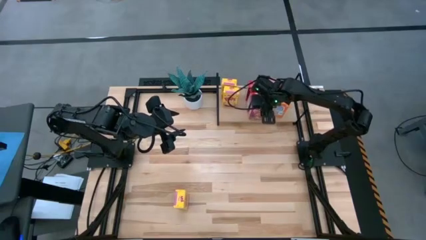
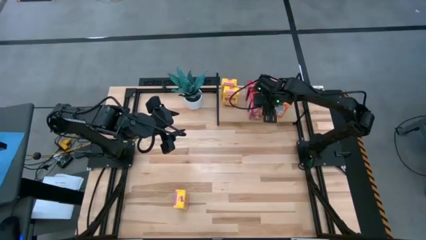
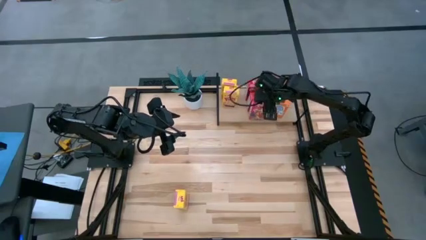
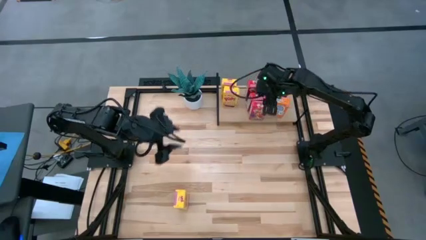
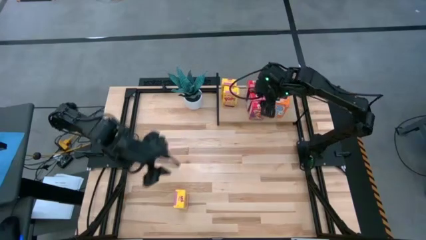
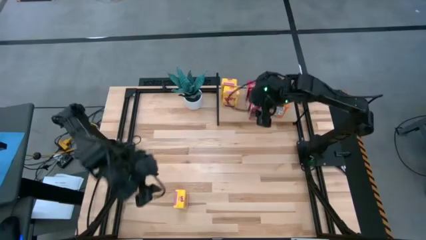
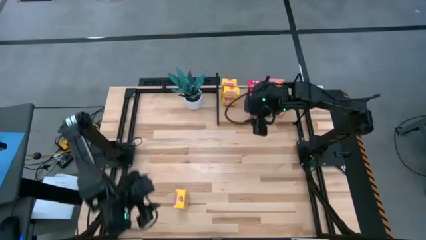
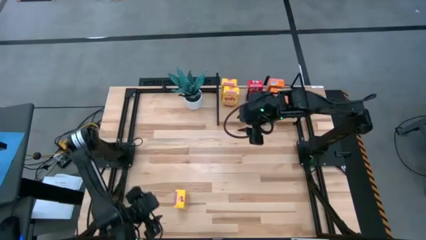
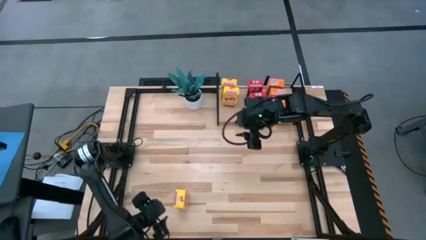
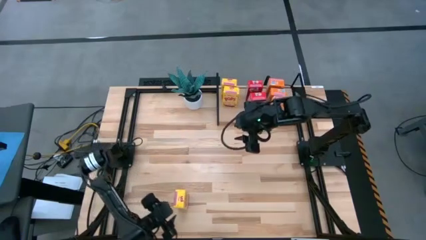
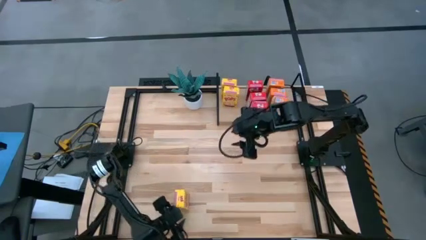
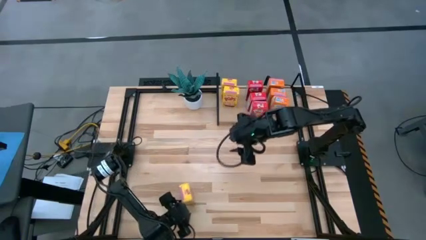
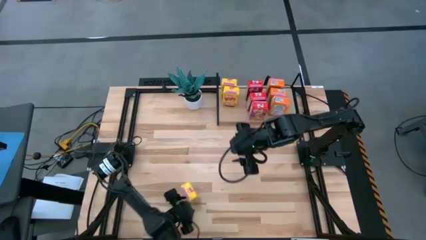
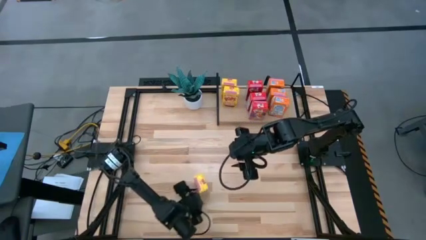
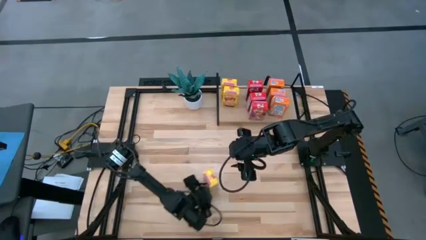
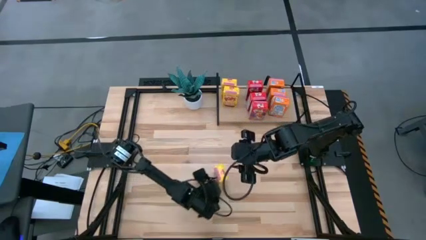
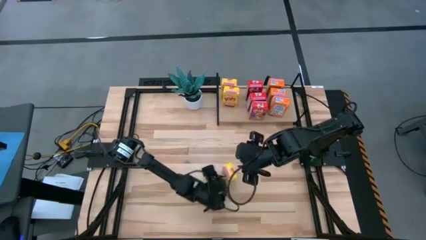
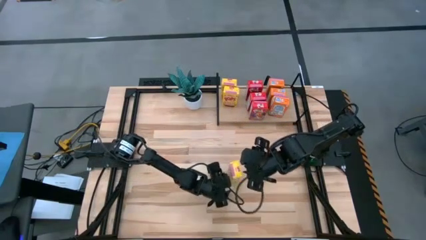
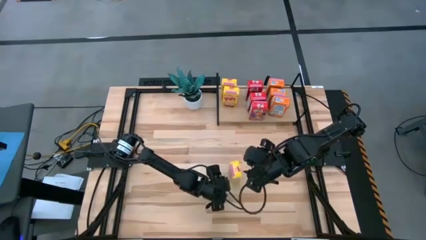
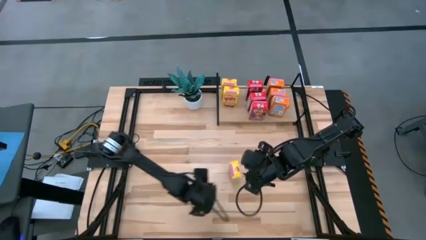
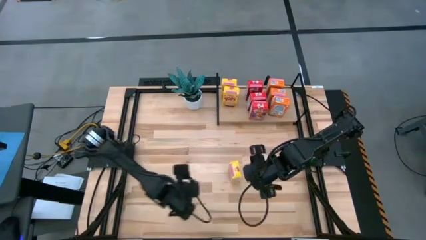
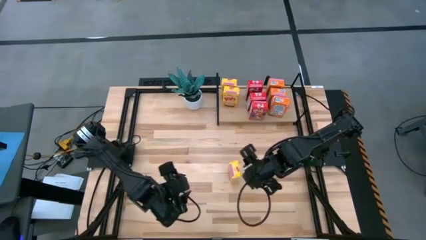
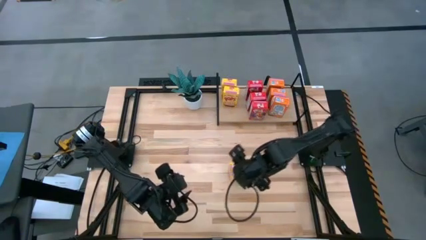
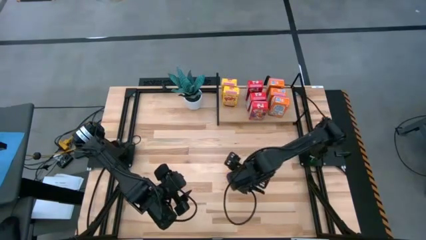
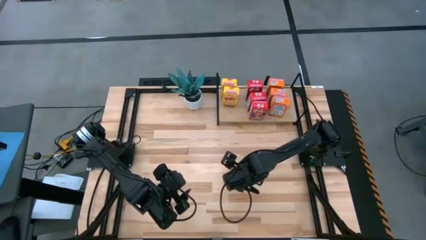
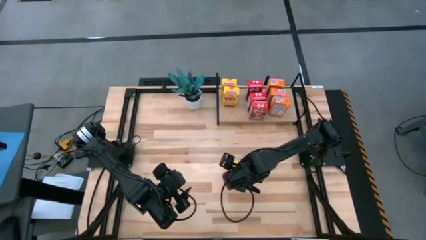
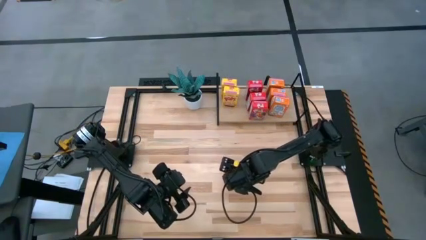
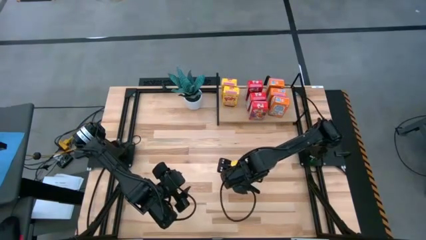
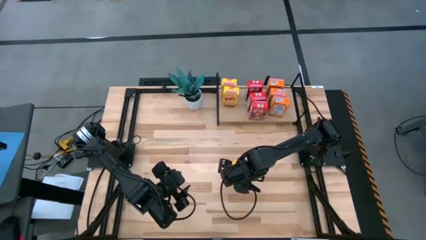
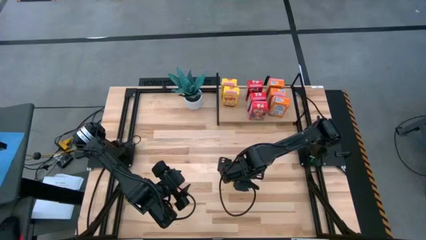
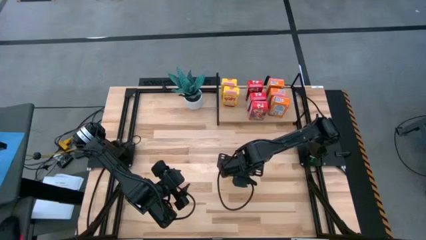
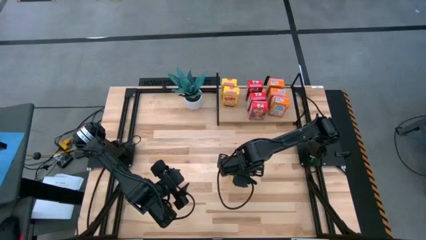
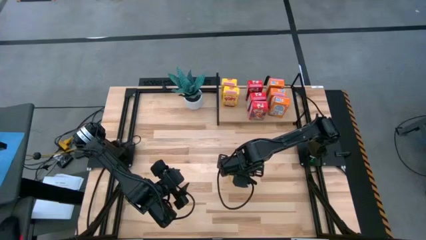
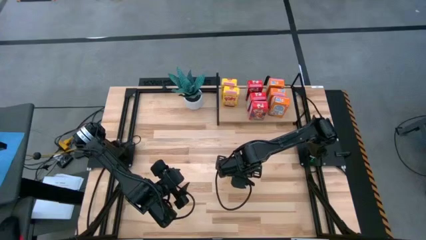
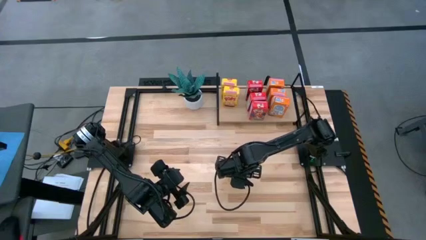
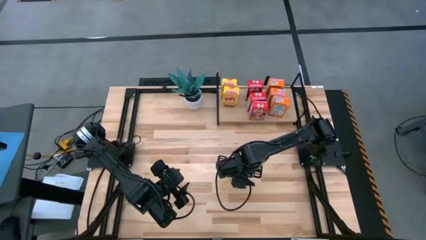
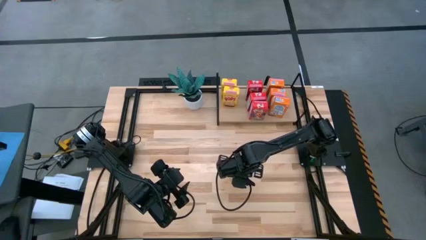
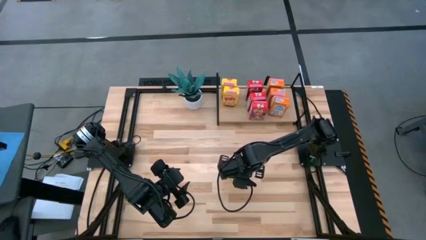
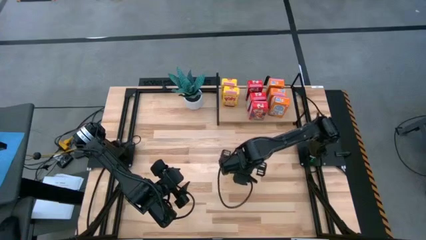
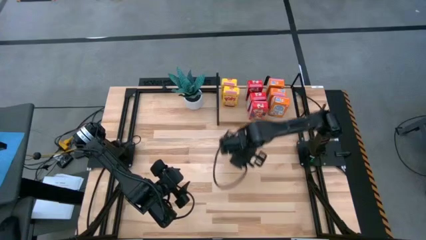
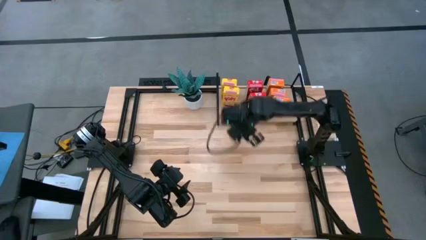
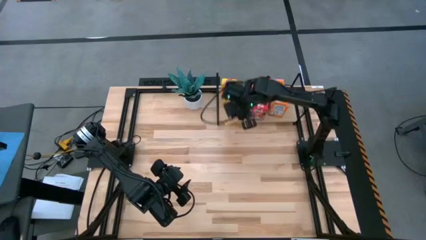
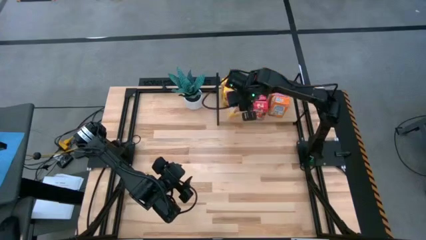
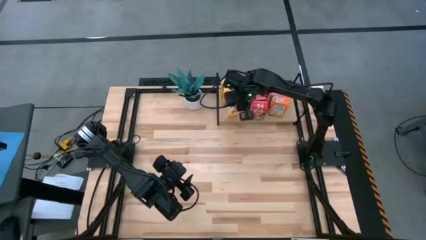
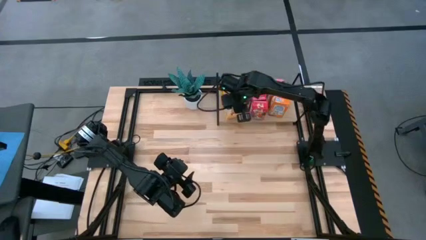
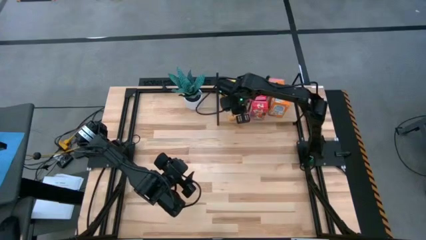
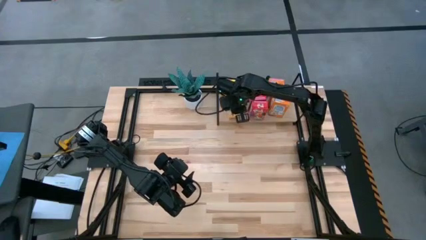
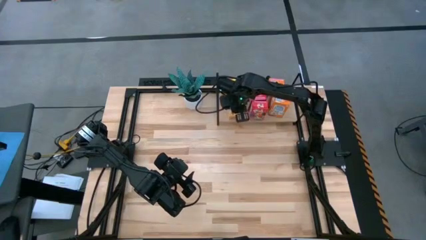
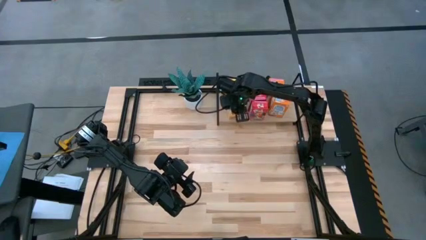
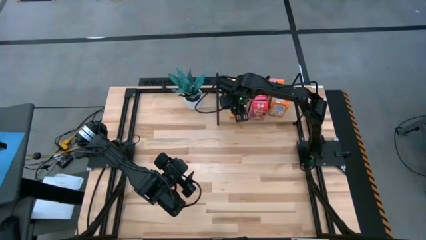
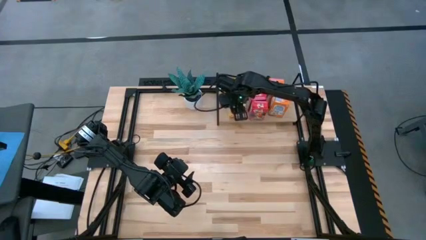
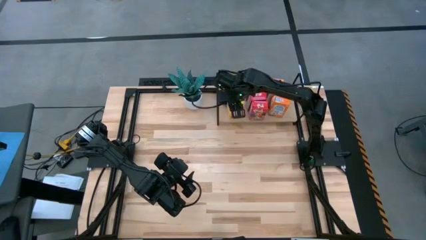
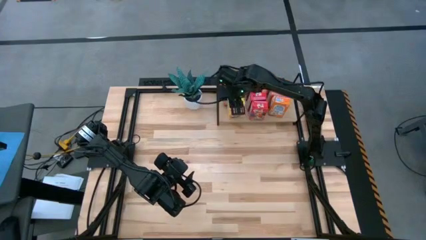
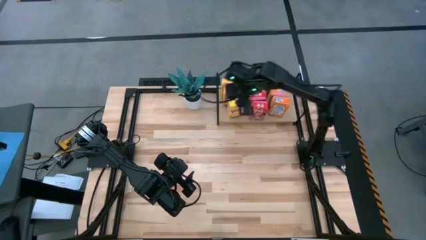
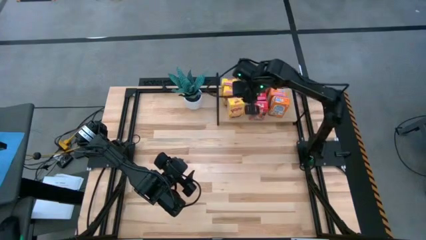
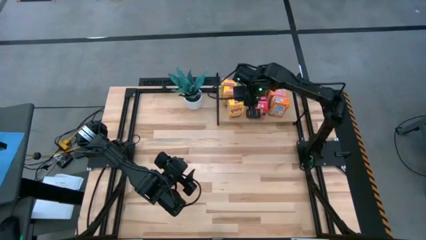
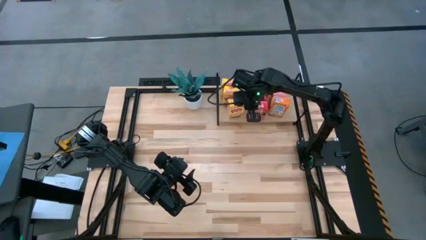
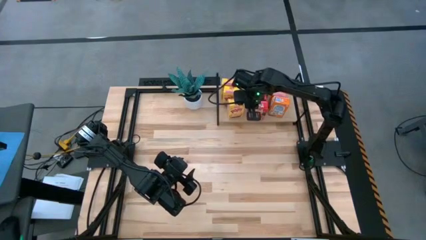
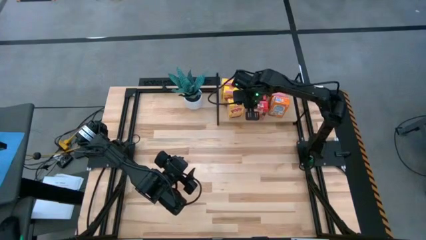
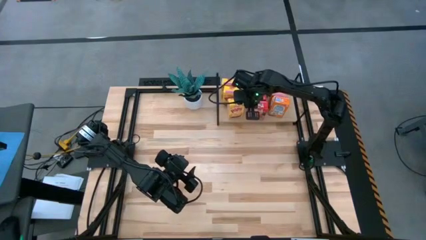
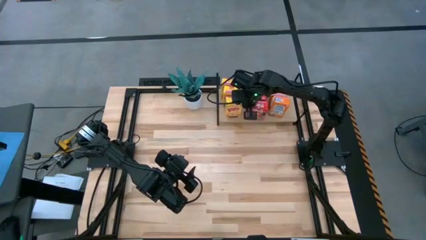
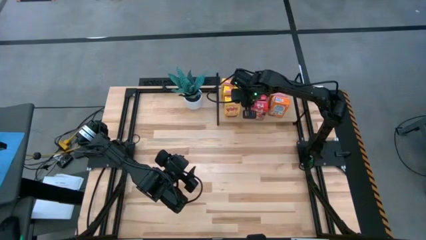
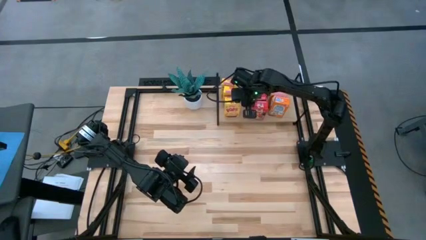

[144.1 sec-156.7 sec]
Task: Stack cereal on shelf
Put the yellow cereal box on the shelf aligned with the yellow cereal boxes

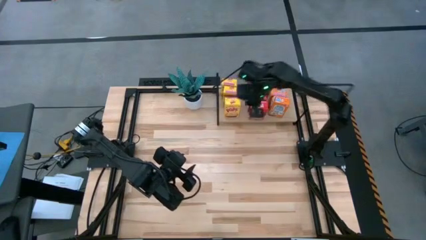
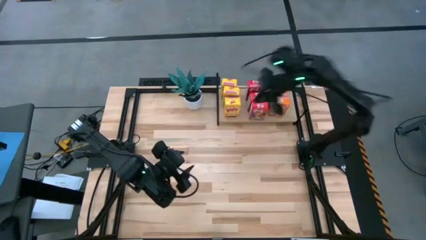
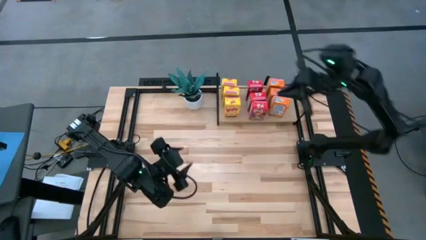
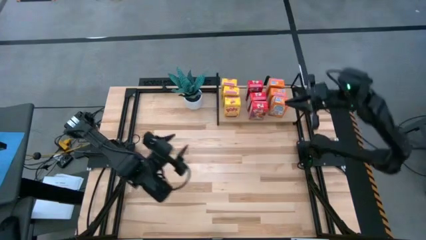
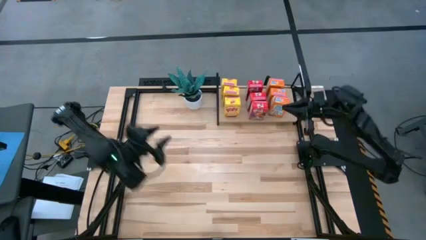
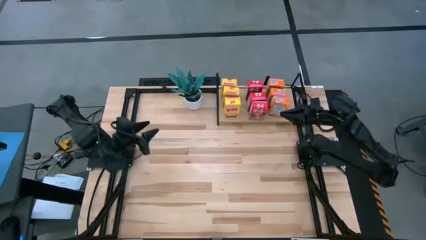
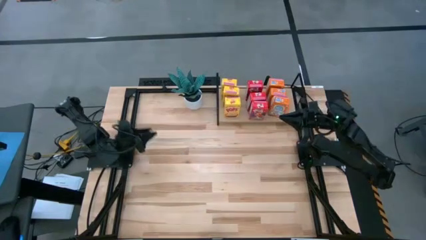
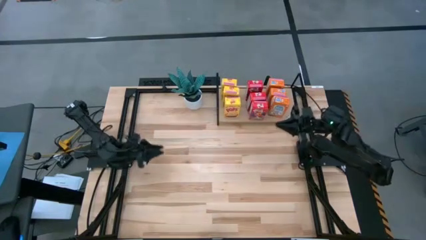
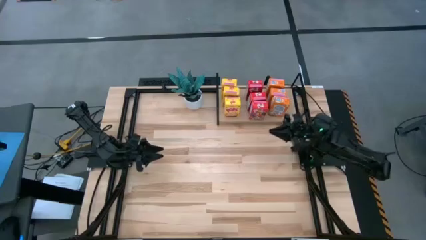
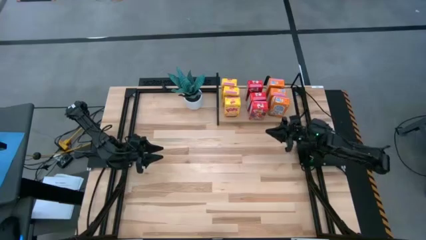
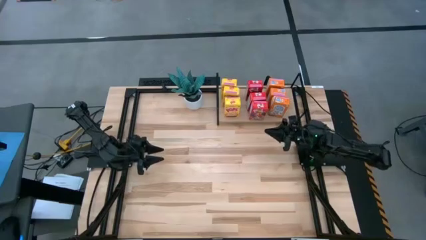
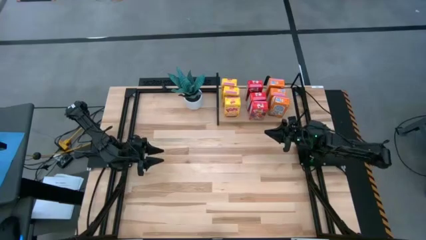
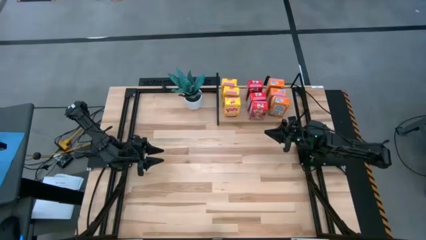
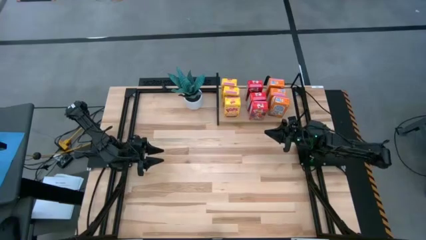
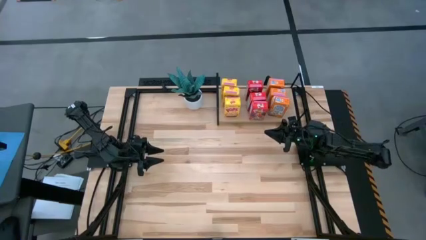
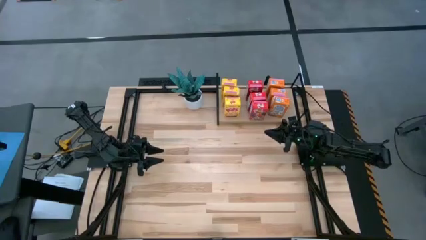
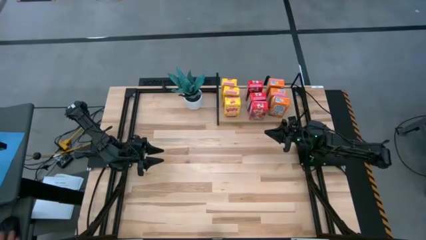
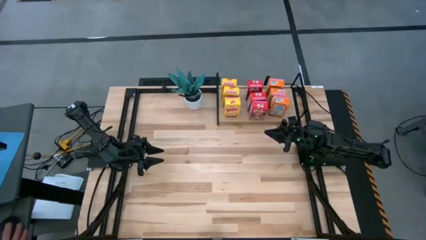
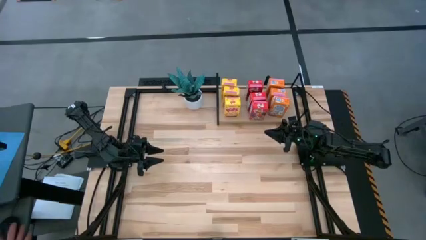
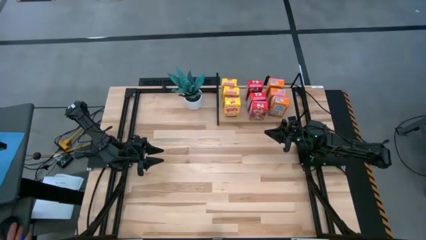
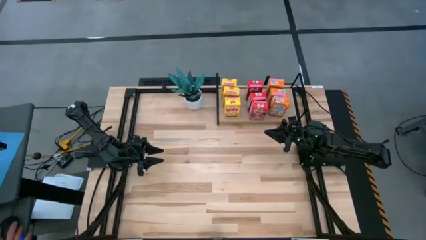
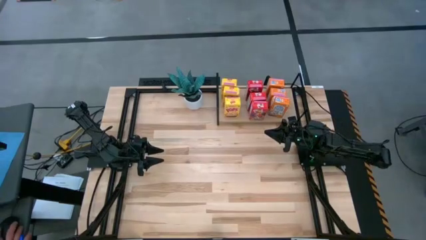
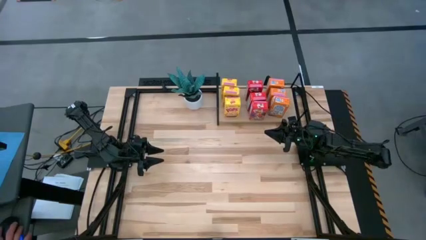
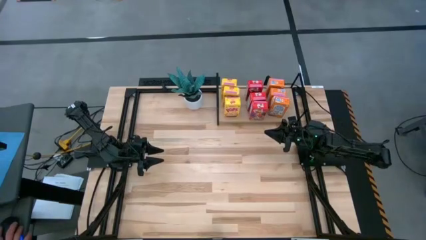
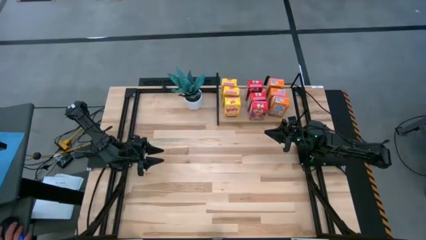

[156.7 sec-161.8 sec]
Return to Home Position
